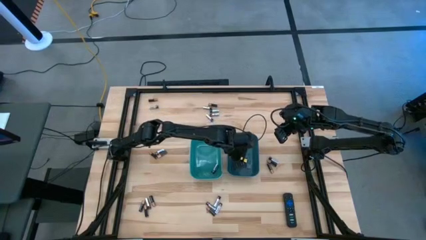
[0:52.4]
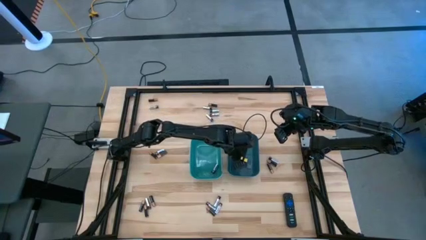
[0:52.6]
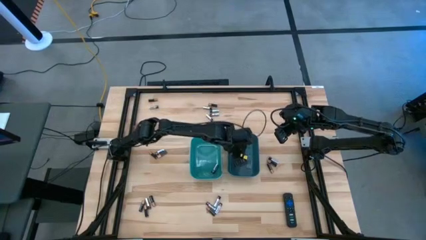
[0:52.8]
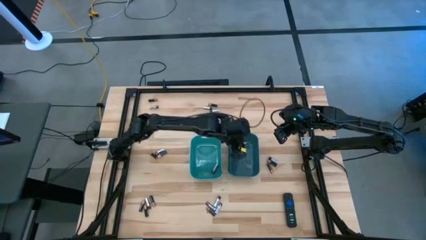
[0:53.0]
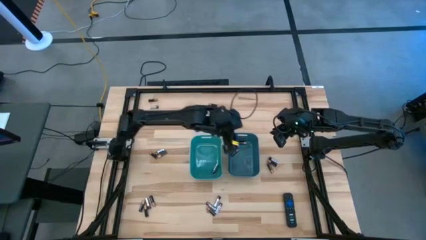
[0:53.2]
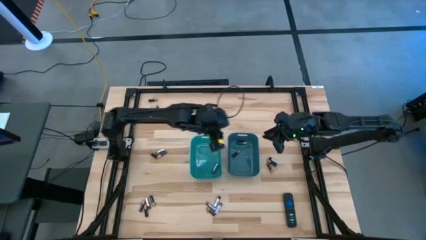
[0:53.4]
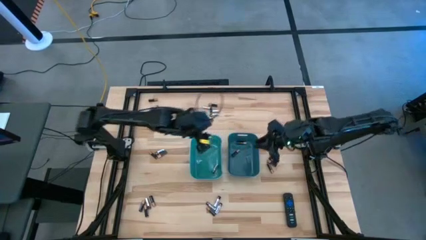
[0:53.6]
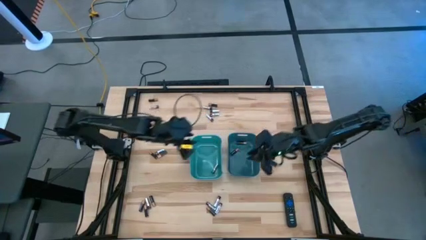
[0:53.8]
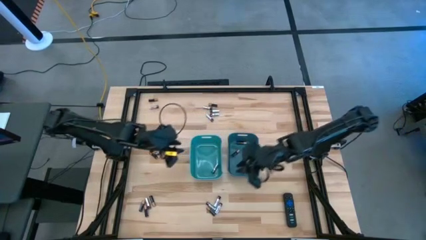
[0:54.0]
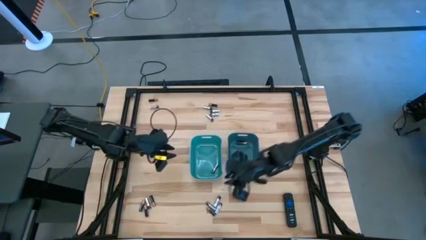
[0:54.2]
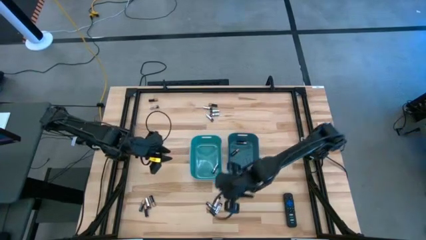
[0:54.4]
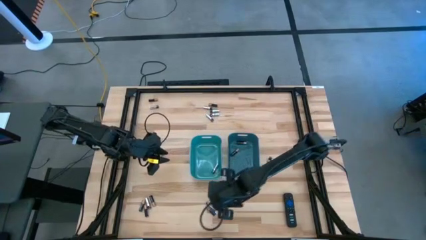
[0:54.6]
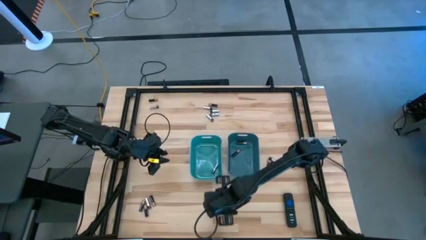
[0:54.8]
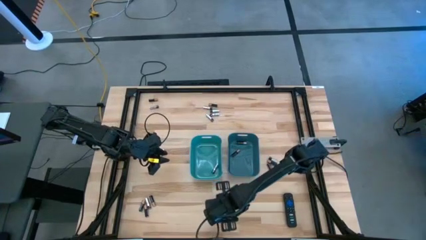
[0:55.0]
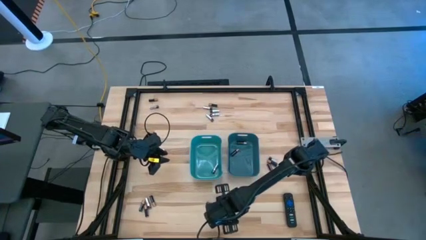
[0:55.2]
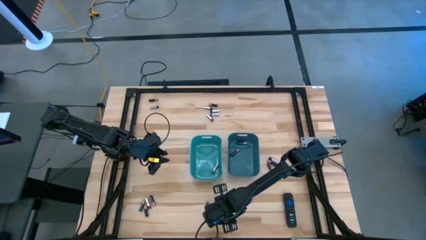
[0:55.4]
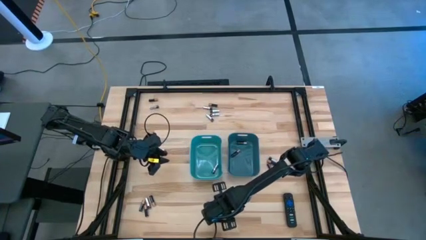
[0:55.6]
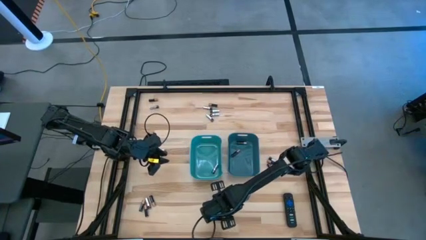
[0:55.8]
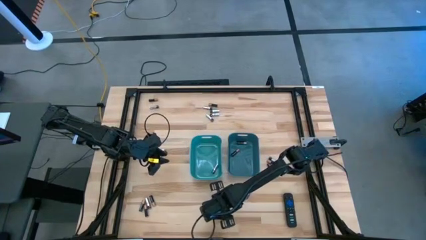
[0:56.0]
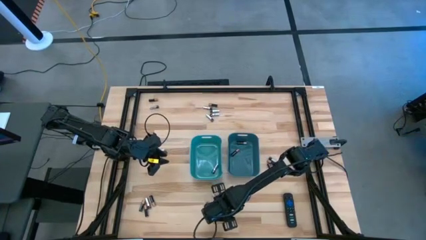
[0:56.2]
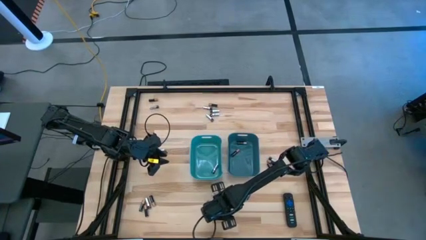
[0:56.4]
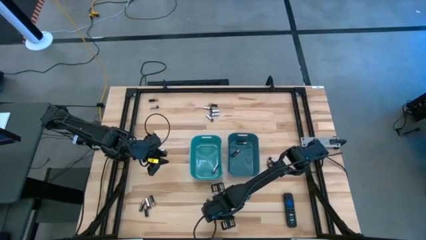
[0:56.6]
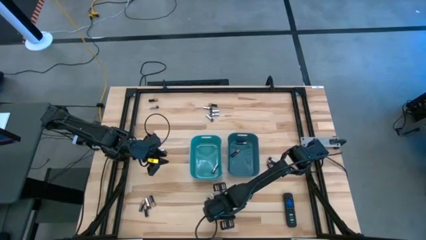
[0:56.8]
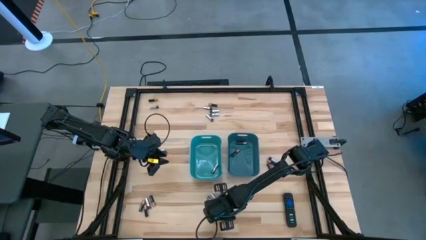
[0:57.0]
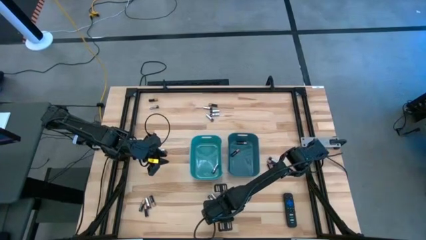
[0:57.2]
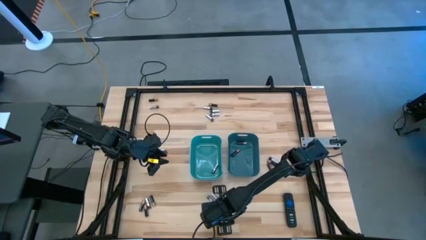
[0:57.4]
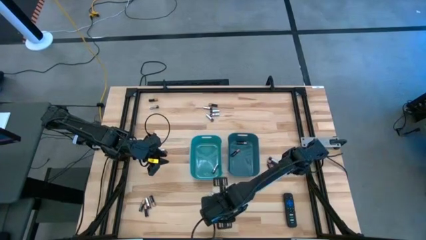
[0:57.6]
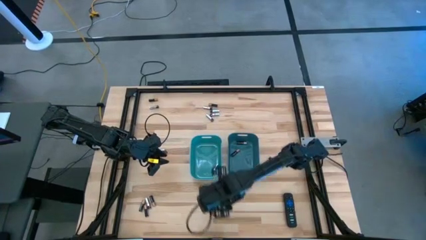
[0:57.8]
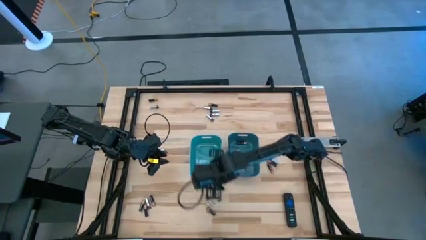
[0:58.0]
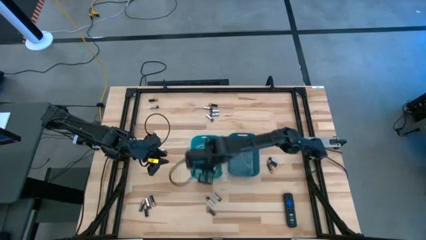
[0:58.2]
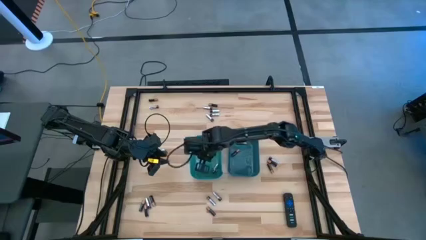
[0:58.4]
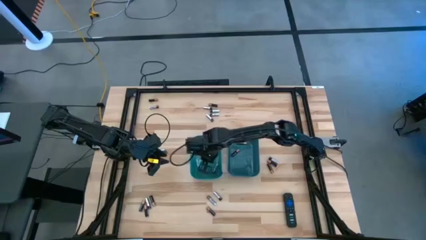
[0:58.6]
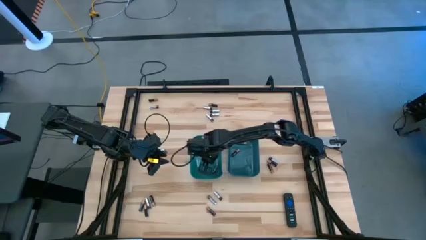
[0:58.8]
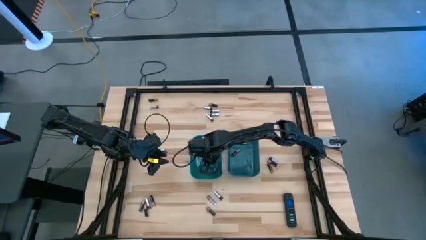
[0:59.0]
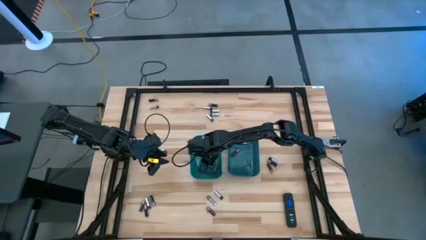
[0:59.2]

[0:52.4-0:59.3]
Task: Sort batteries
Put the silver battery into the green bin

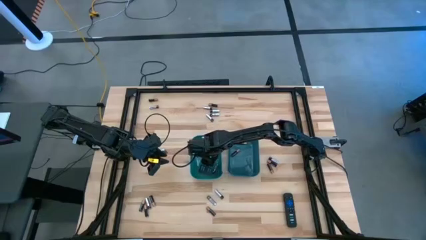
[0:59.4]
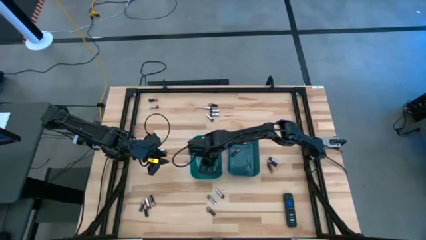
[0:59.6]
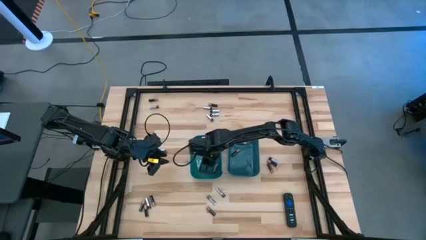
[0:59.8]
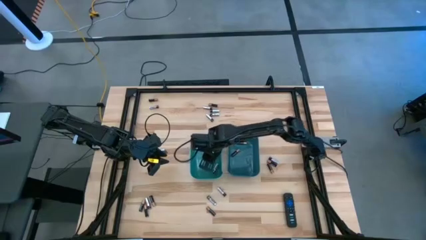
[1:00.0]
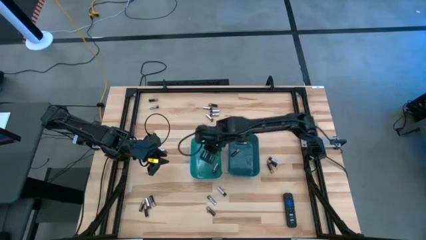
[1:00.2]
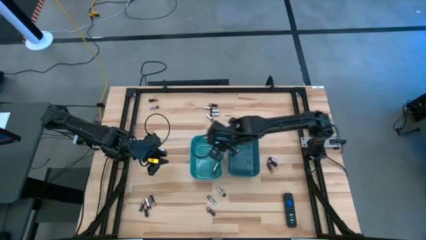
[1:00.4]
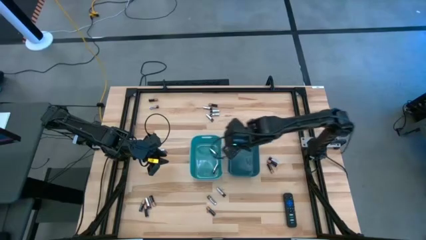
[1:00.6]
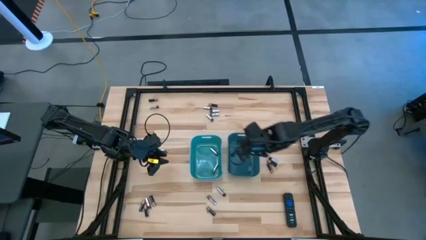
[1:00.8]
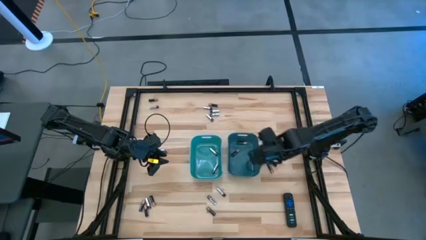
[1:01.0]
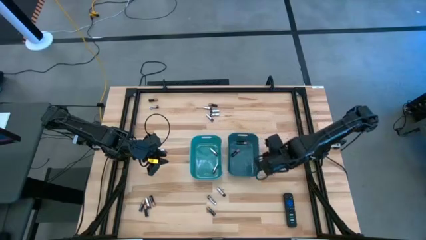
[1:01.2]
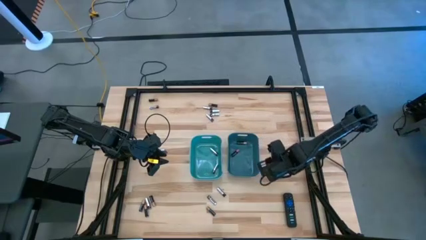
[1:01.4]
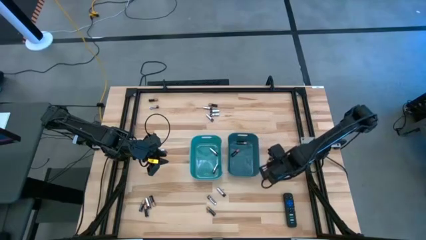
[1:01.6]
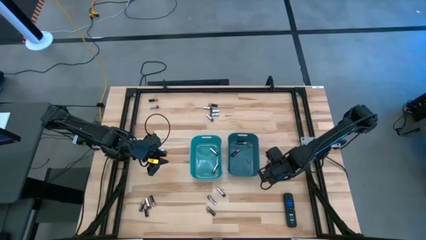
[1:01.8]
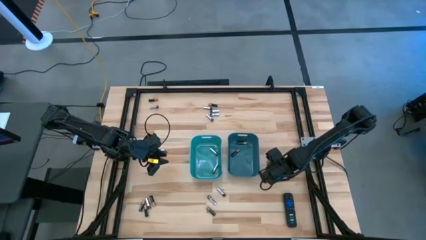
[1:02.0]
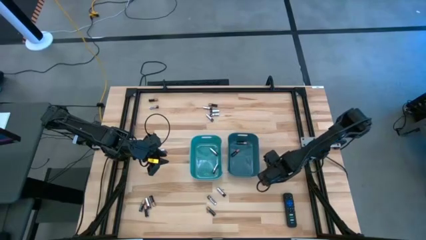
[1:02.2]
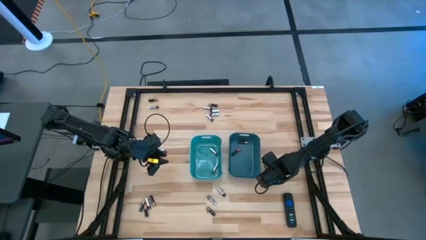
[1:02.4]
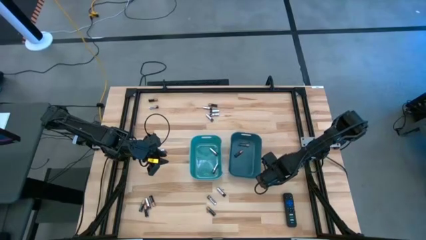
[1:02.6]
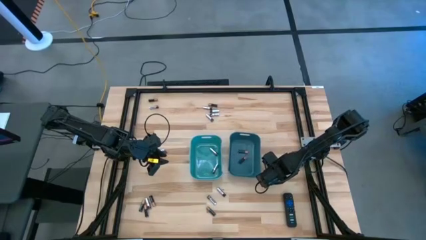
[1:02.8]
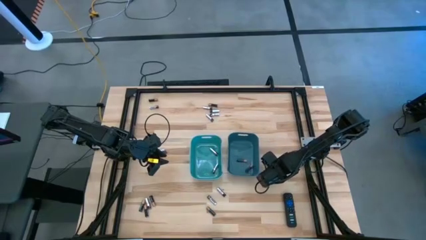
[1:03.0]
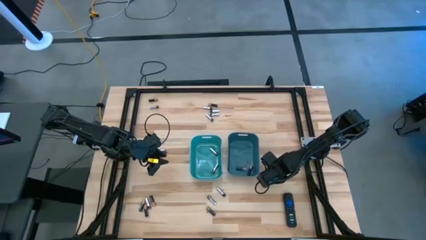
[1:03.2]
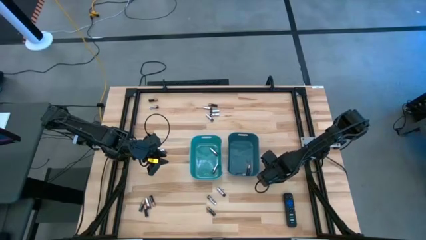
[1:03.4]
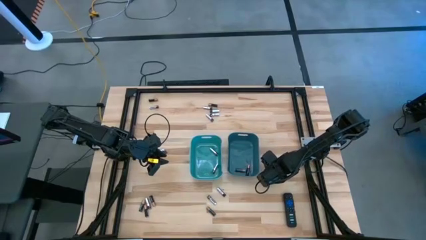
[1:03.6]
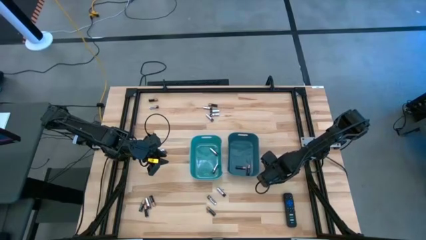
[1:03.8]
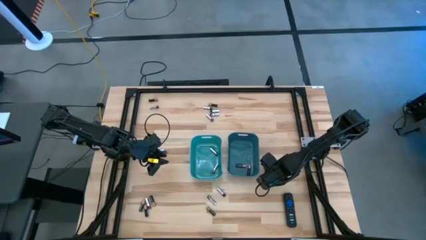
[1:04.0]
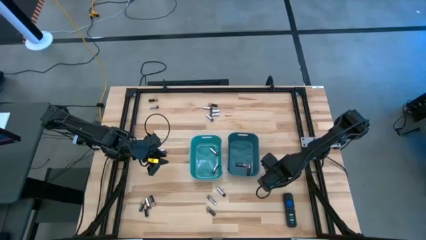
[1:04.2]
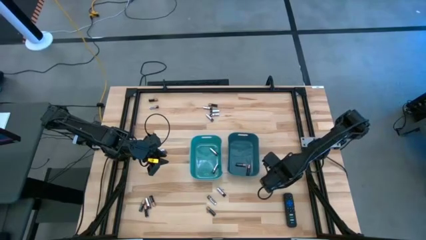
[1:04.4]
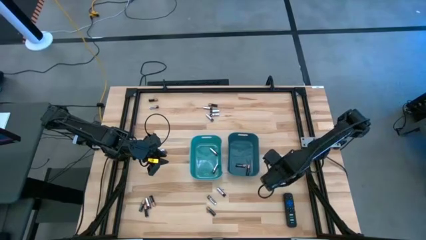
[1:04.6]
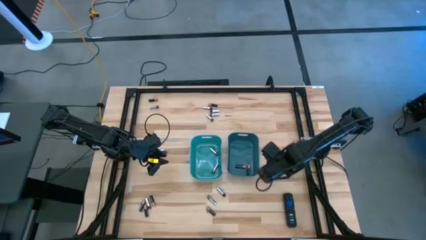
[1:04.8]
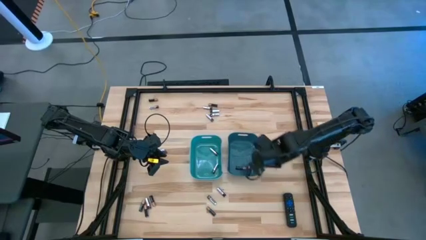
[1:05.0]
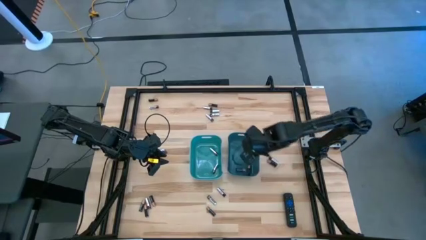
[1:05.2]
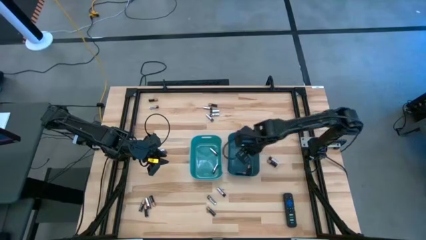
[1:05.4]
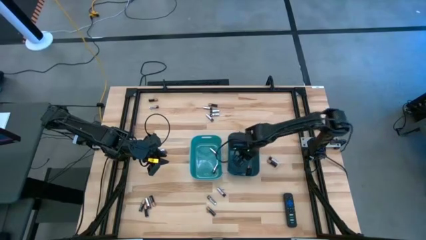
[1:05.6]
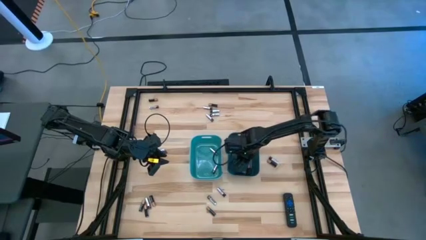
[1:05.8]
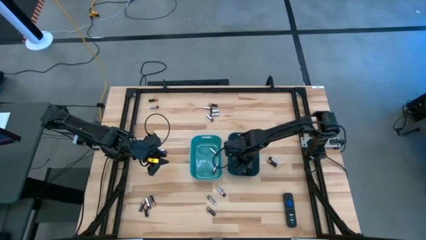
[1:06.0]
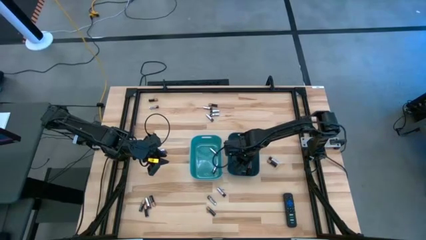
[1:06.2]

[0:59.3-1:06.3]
Put the black battery into the blue bin
